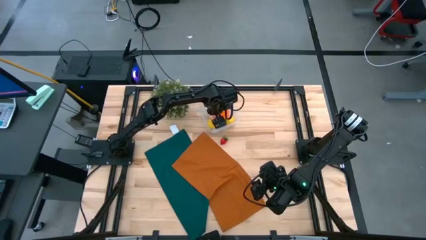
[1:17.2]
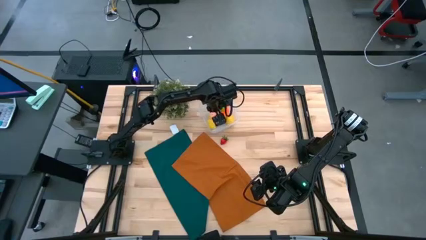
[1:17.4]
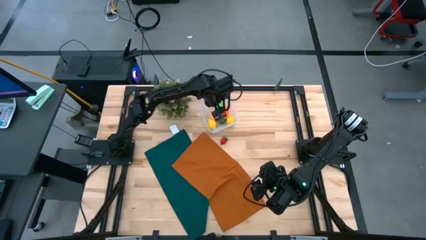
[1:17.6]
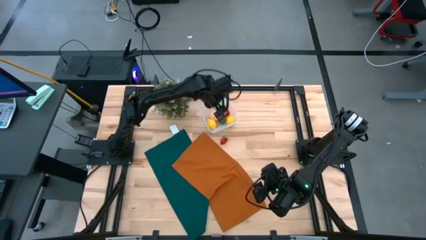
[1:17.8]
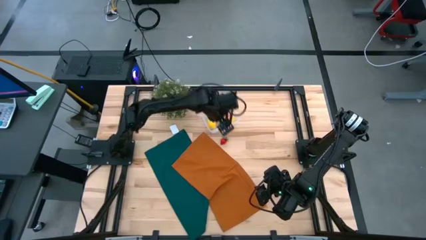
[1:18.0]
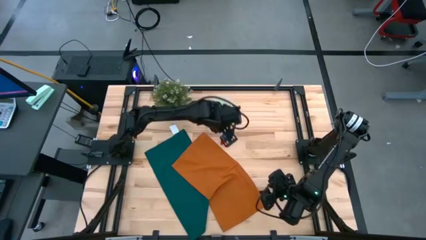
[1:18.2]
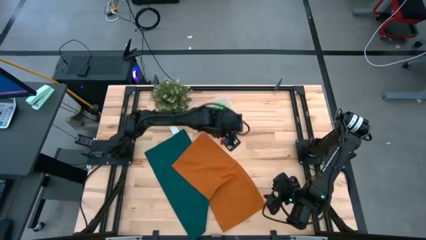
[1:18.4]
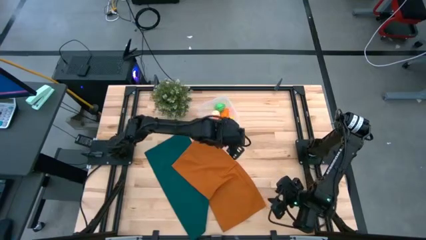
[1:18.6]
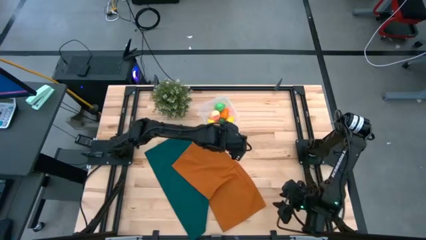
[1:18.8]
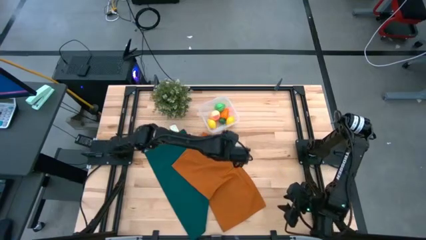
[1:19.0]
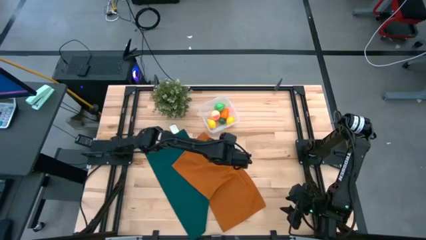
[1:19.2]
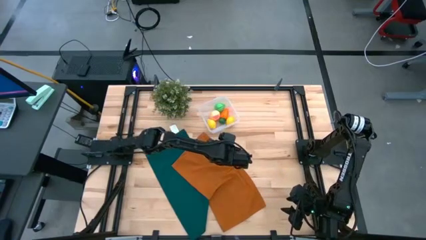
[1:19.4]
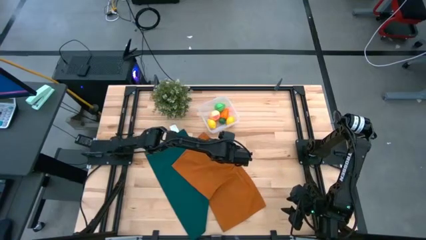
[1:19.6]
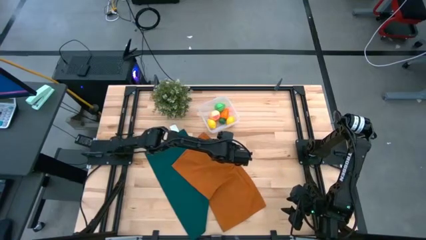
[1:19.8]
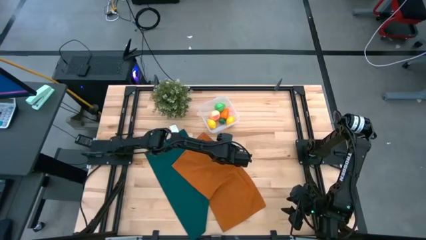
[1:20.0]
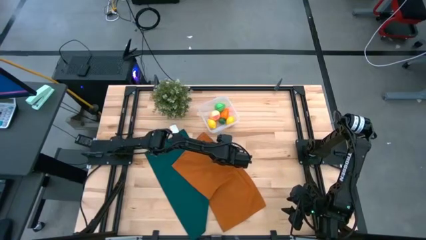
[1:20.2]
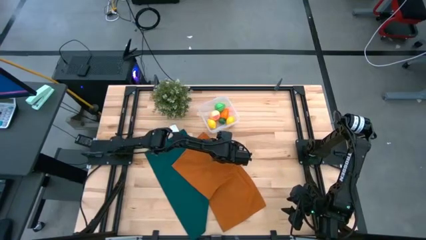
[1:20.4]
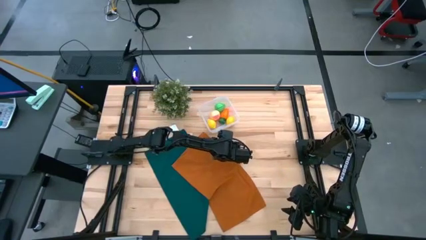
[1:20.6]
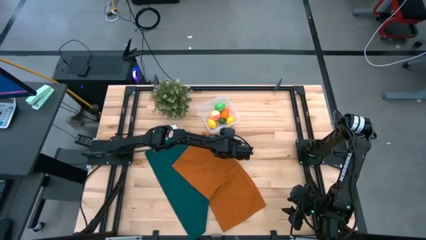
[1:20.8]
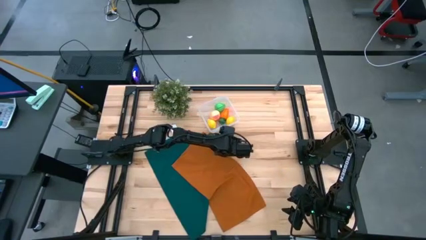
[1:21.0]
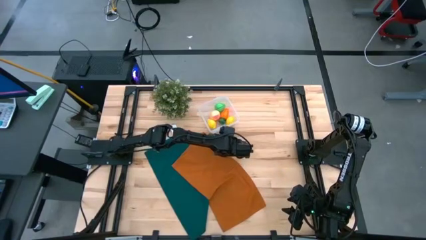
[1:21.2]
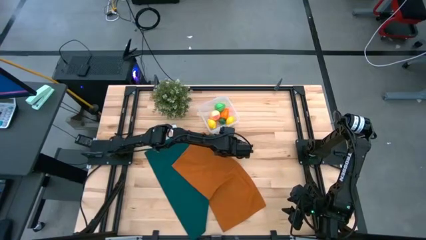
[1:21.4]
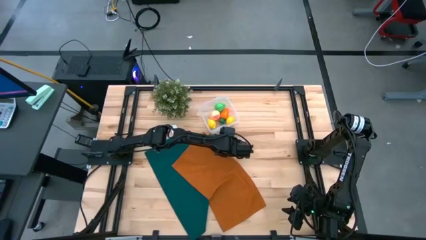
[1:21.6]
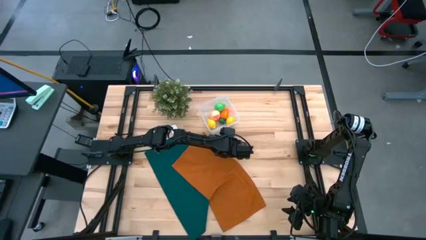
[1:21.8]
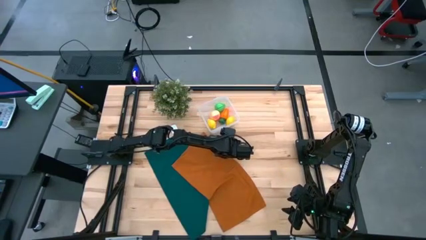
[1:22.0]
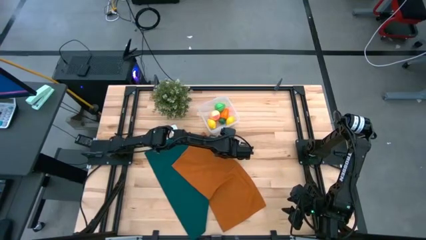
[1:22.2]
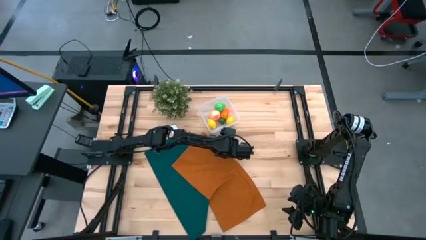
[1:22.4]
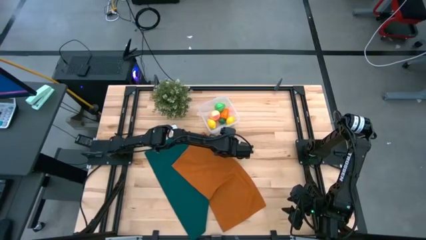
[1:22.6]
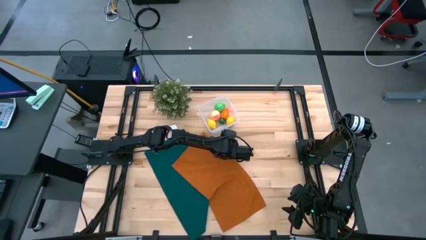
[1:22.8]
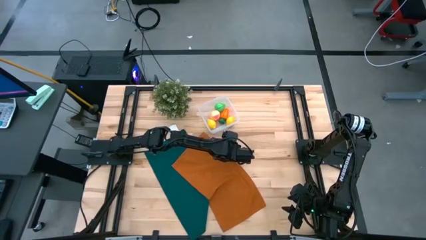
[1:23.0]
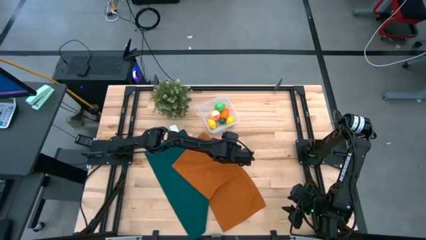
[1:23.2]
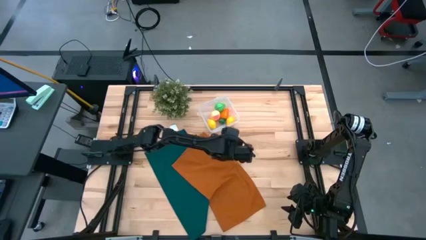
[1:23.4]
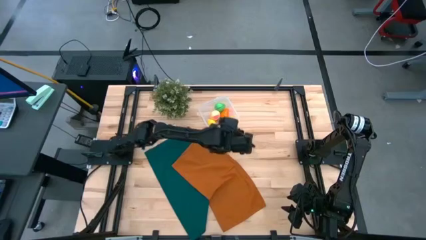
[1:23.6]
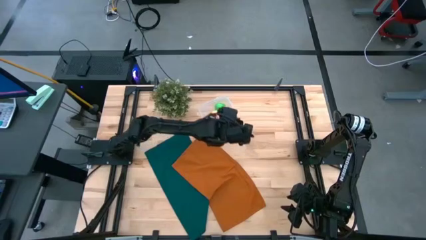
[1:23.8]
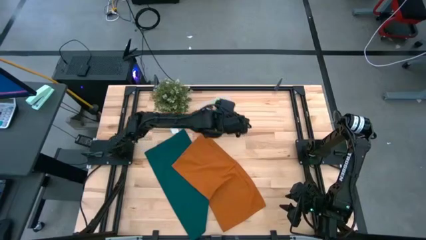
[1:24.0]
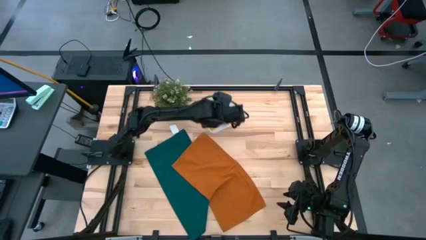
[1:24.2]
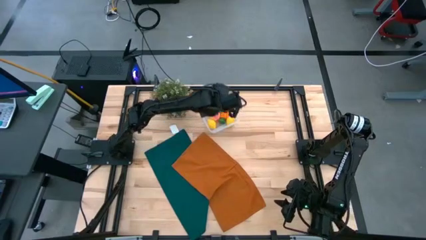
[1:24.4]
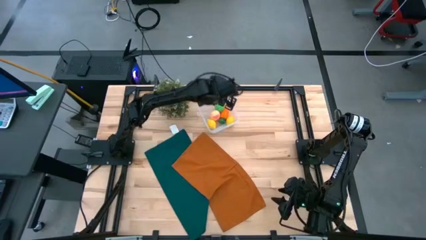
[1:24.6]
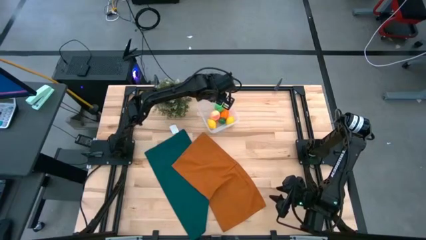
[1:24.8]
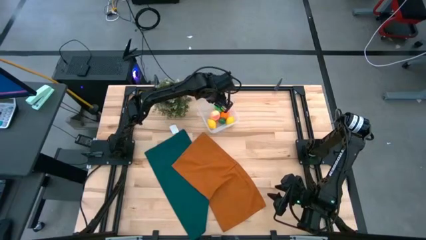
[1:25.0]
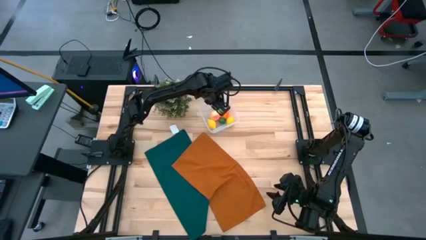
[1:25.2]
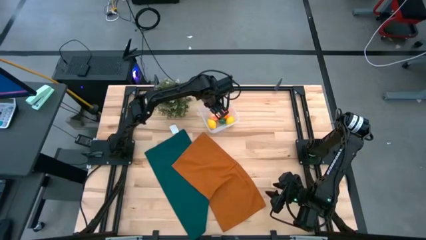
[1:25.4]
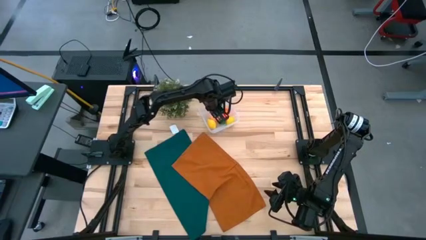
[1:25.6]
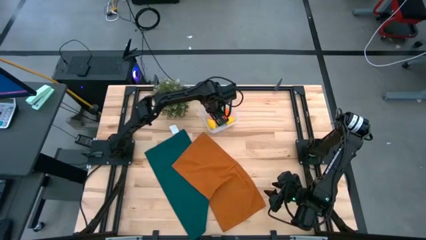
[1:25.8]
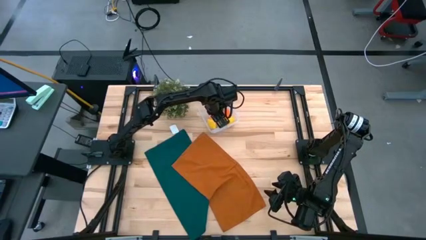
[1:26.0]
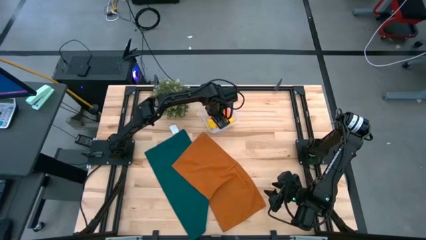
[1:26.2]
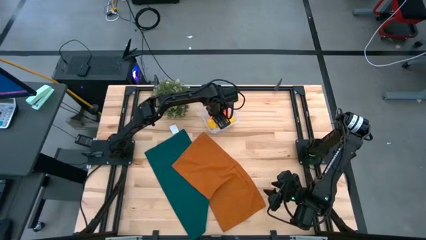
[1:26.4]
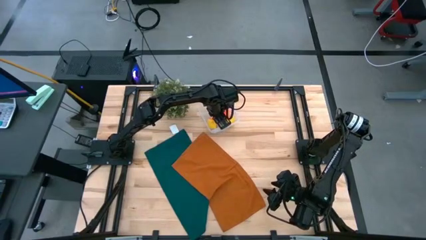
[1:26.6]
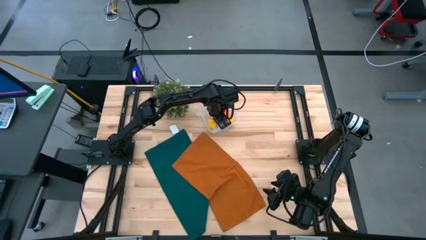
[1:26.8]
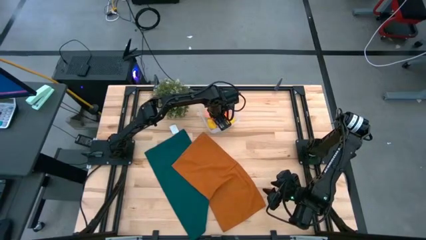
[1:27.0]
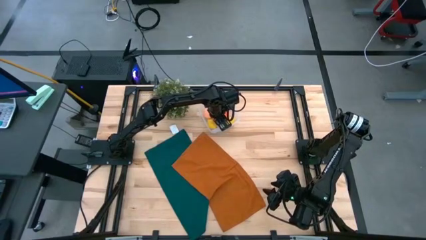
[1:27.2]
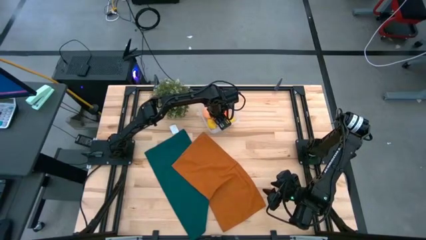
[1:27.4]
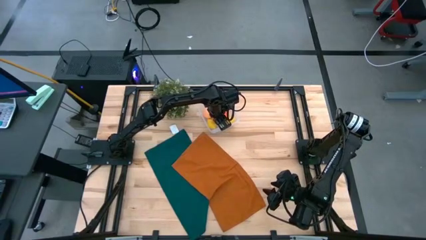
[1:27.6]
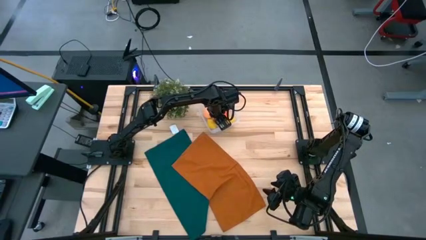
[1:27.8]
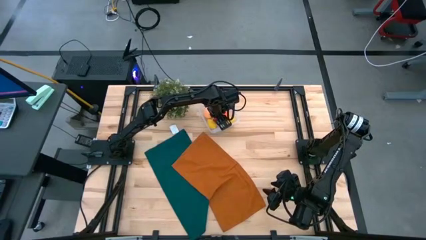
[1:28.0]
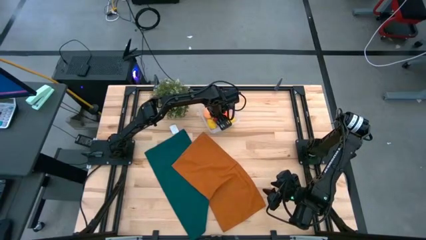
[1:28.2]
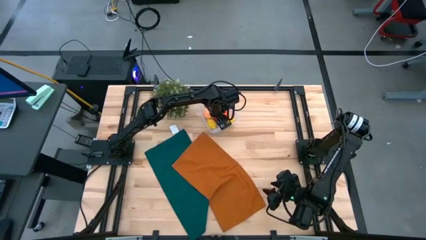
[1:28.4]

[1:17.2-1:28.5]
Task: Pick and placing Produce into tupperware
Put the red strawberry into the transparent bin

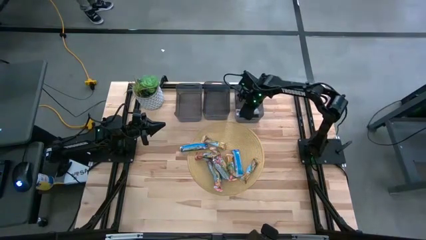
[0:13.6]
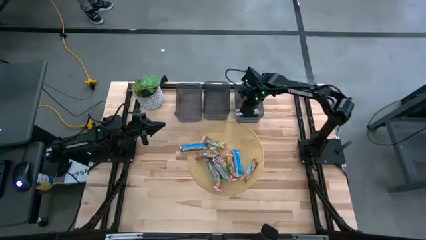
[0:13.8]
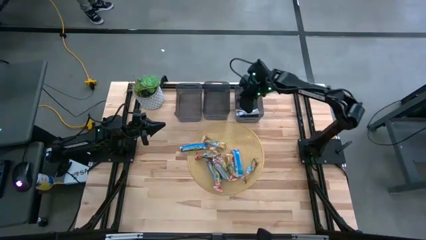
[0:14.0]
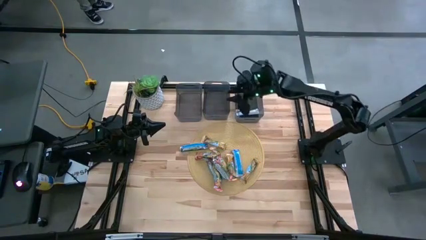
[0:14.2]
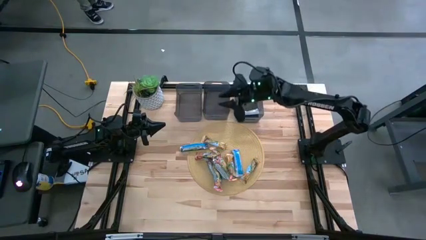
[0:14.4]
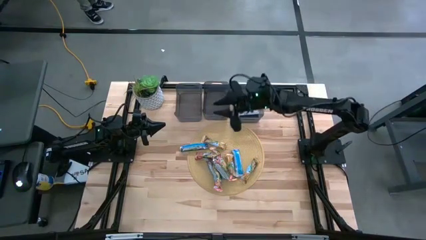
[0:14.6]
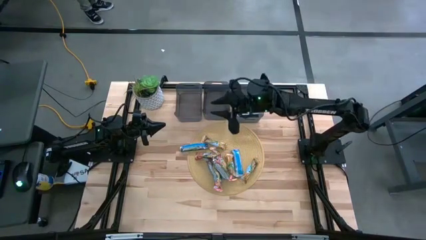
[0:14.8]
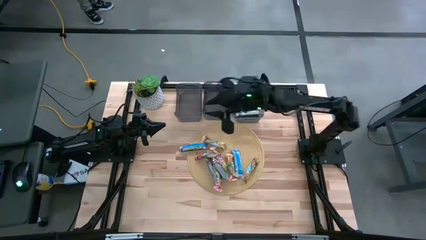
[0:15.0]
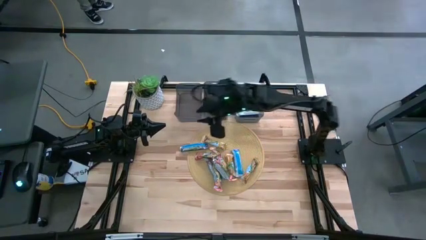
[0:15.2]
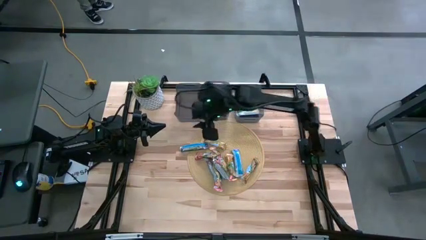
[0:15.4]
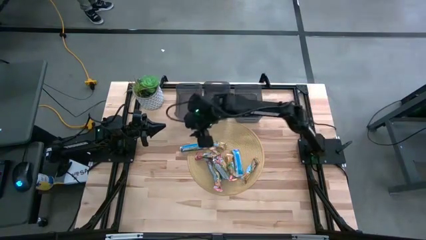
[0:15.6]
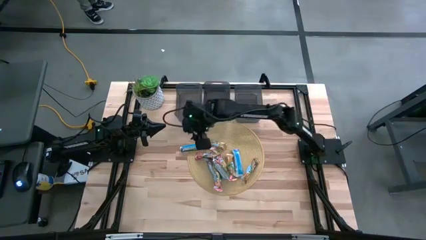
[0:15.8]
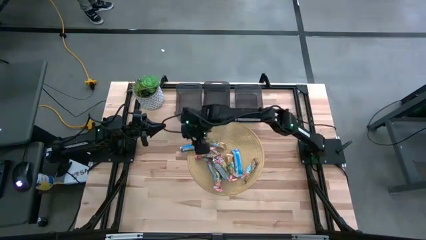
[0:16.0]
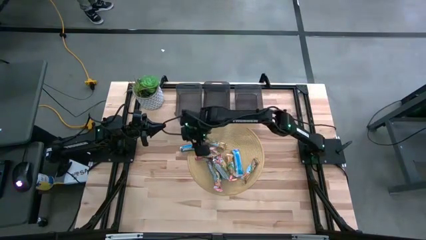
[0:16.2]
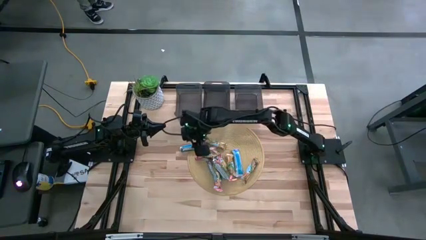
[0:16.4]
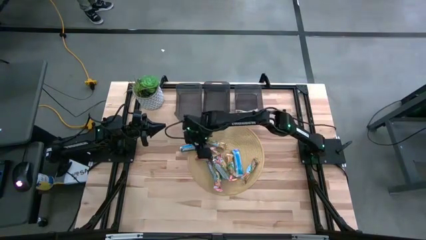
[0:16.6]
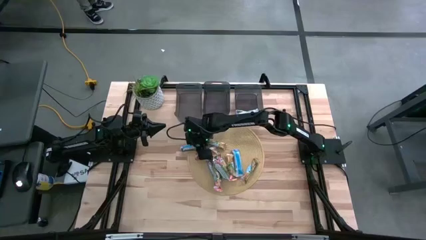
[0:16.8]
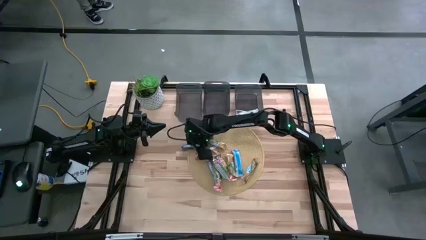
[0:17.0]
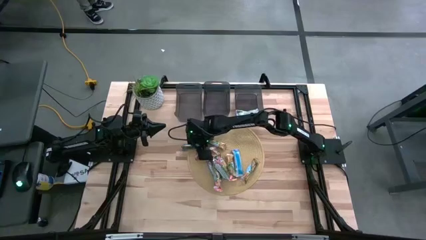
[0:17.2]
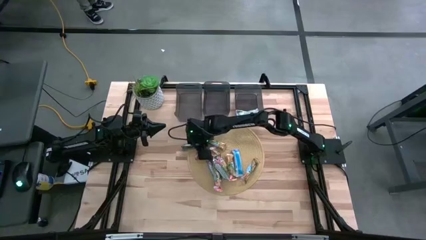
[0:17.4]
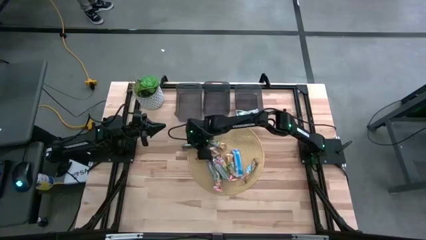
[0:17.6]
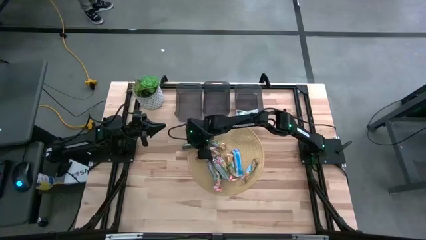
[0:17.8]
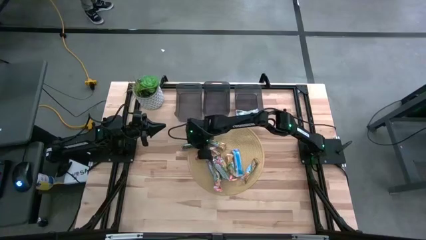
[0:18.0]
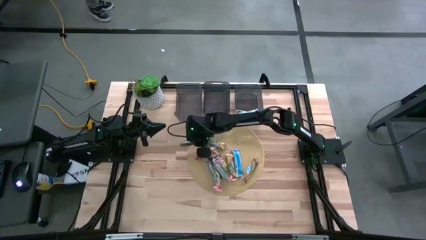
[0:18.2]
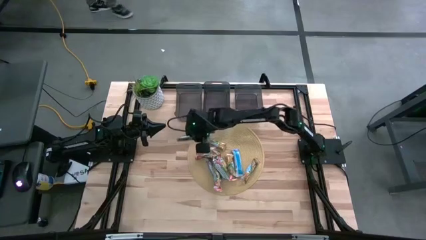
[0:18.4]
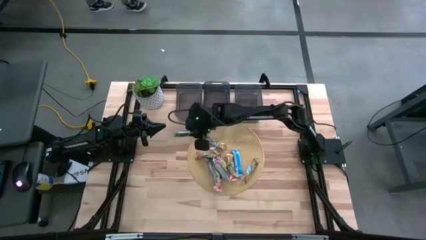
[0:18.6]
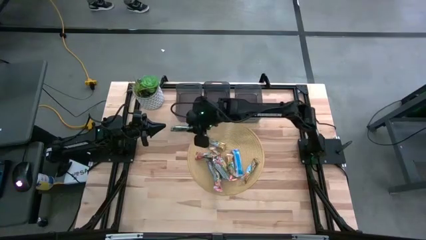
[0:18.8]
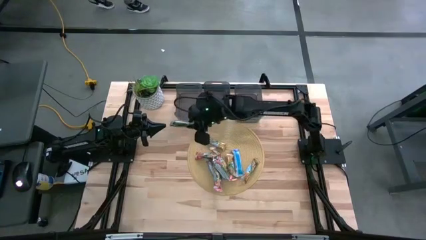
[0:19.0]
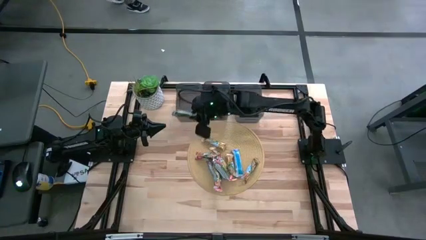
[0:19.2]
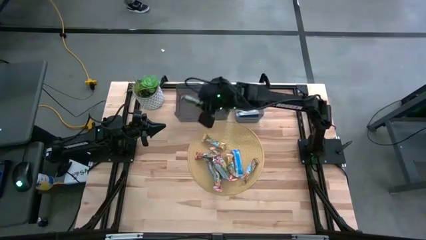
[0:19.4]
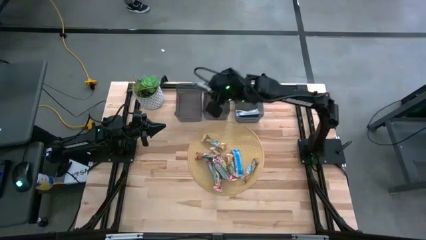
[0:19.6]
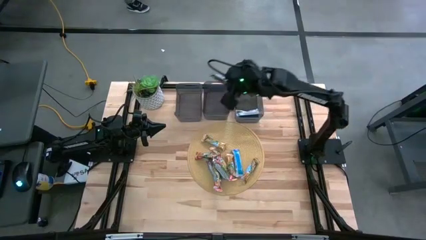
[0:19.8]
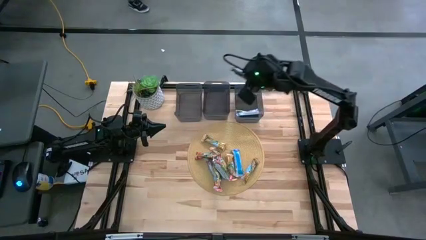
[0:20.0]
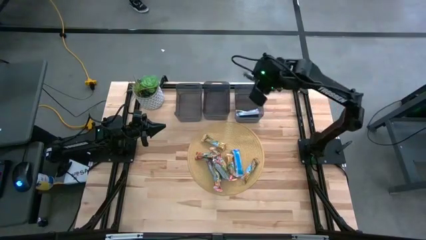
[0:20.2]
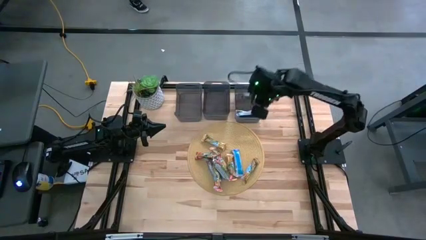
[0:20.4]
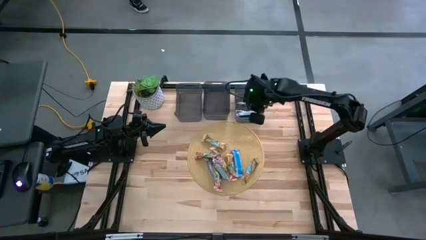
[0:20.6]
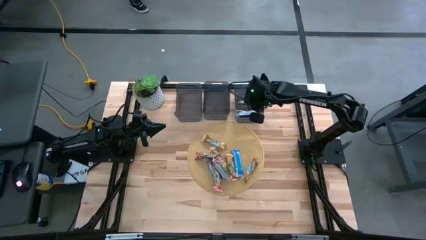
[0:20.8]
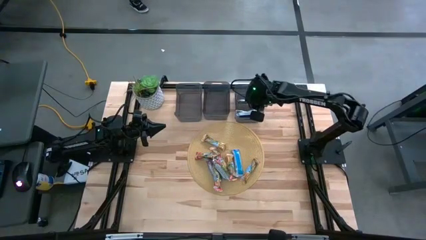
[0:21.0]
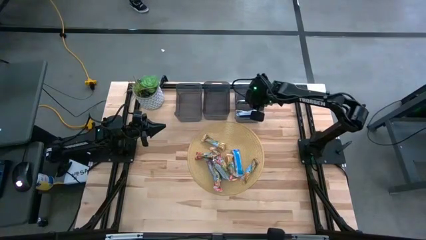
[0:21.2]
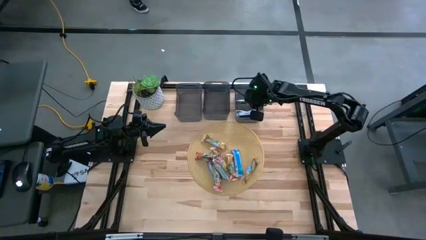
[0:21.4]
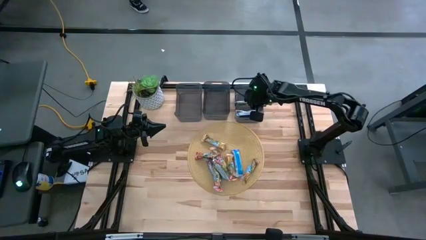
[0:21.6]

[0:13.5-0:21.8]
Task: Pick and place Granola Bars by type
Put the blue granola bar into the right black bin
